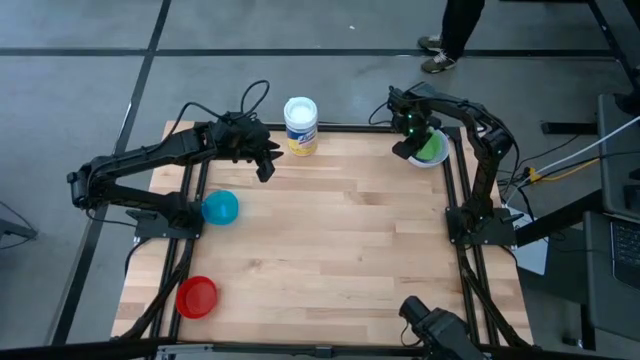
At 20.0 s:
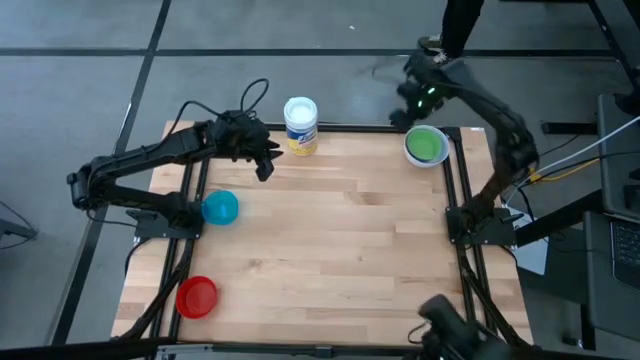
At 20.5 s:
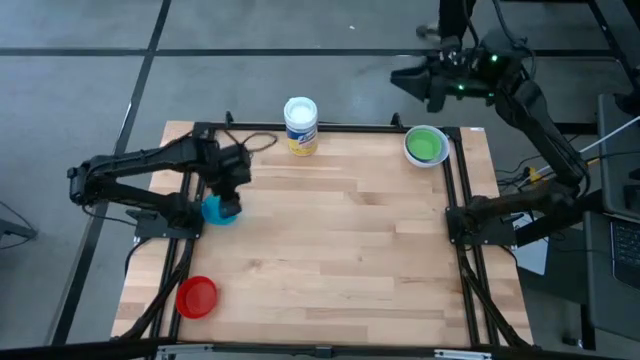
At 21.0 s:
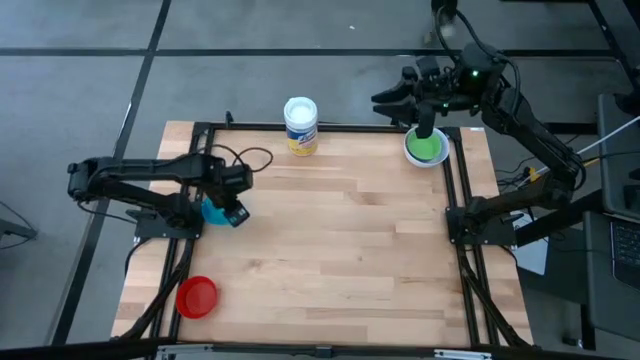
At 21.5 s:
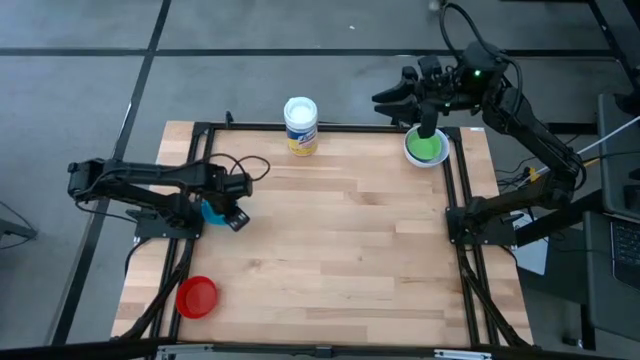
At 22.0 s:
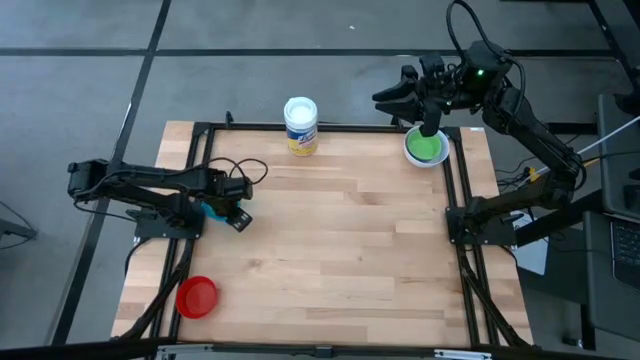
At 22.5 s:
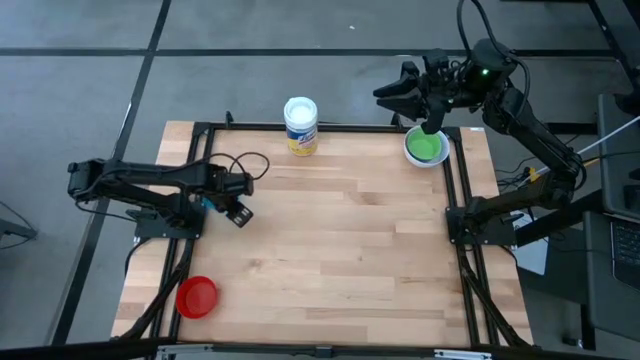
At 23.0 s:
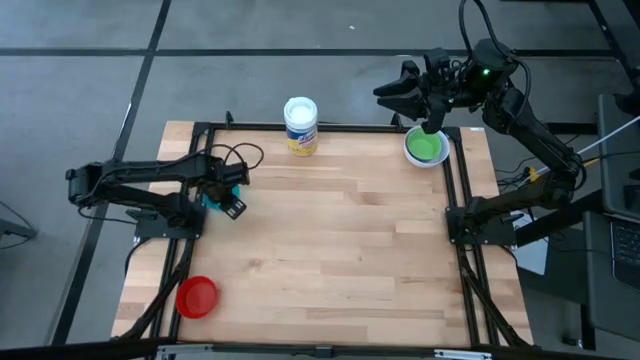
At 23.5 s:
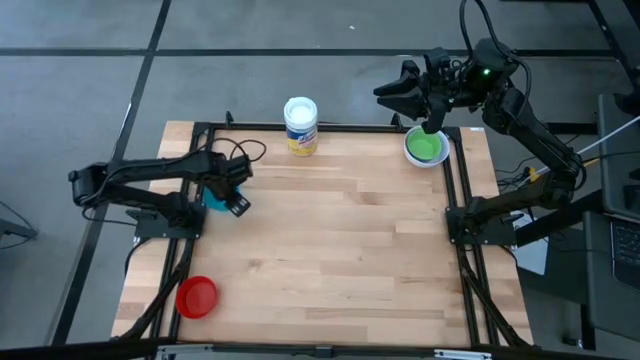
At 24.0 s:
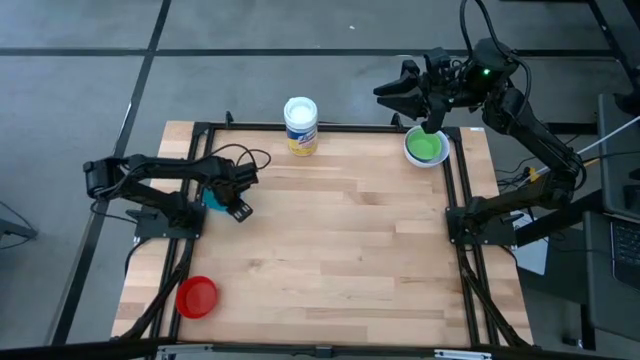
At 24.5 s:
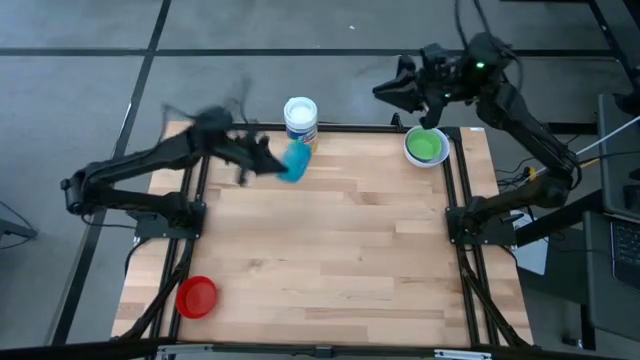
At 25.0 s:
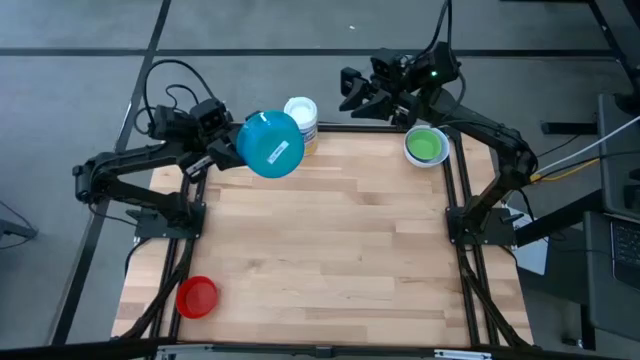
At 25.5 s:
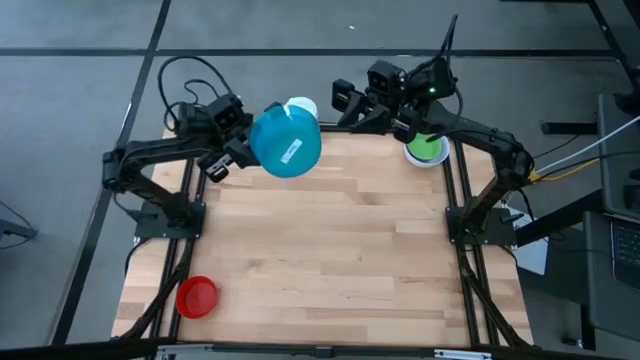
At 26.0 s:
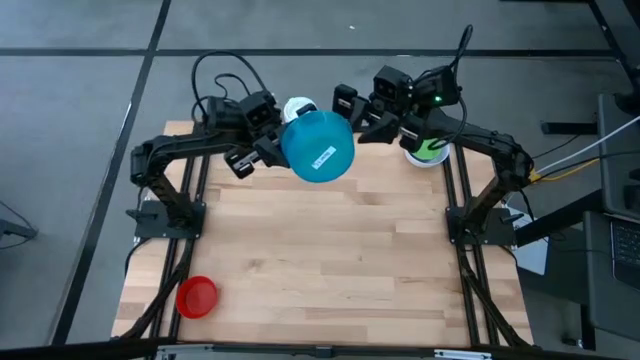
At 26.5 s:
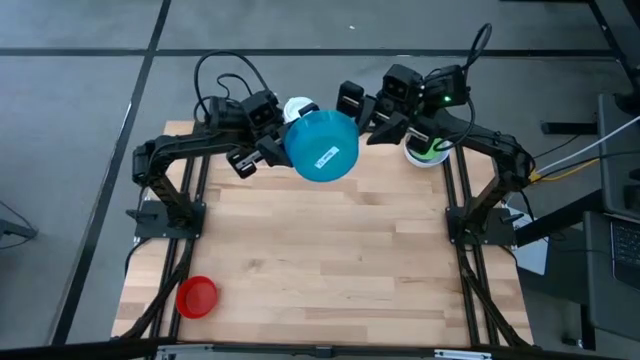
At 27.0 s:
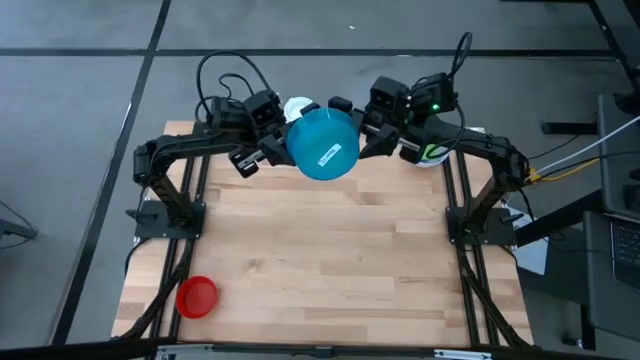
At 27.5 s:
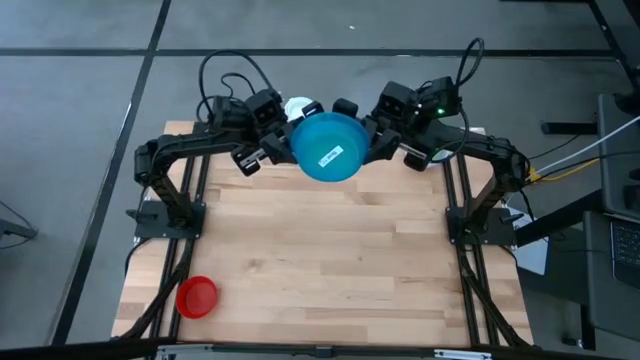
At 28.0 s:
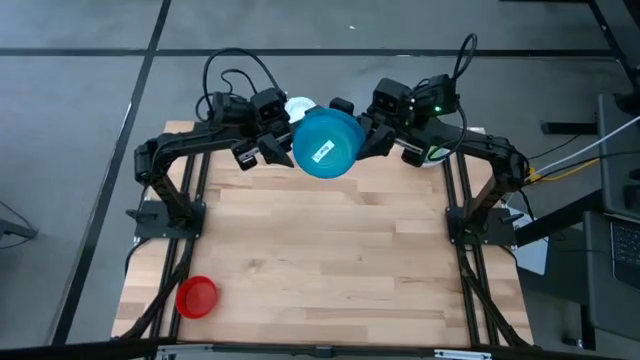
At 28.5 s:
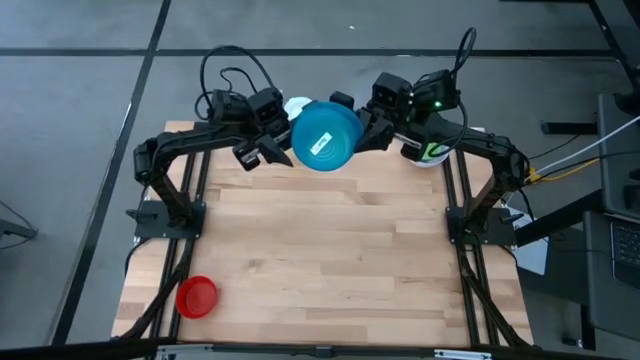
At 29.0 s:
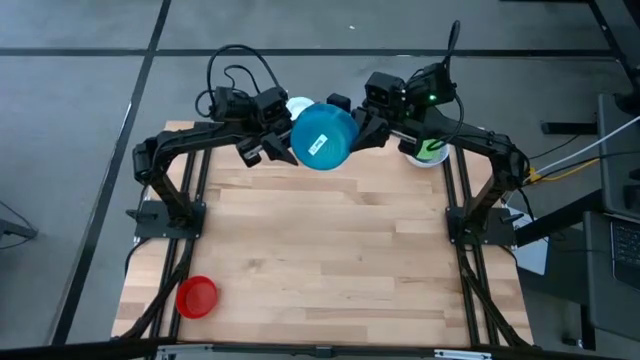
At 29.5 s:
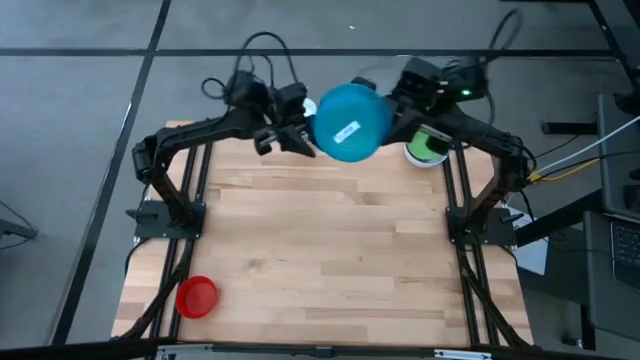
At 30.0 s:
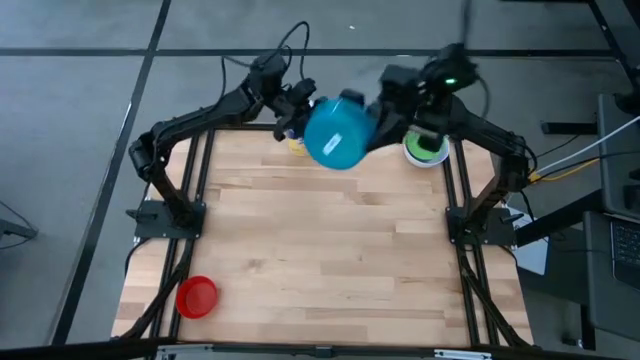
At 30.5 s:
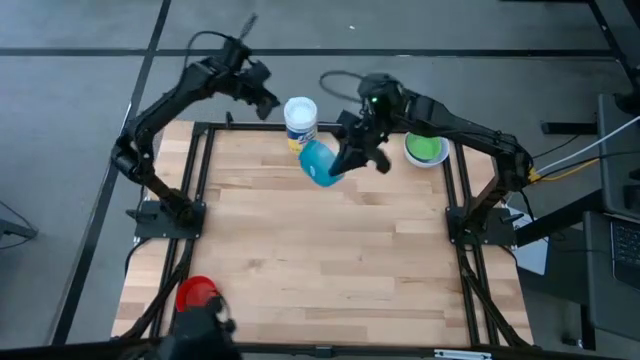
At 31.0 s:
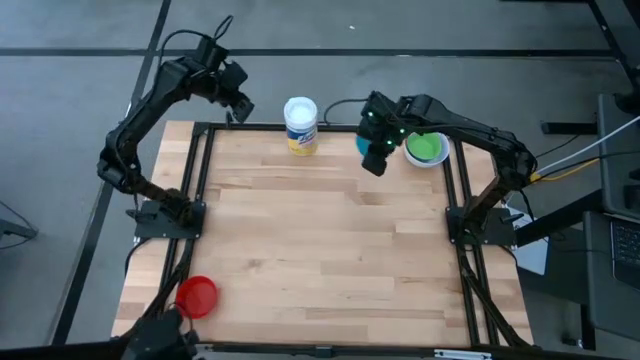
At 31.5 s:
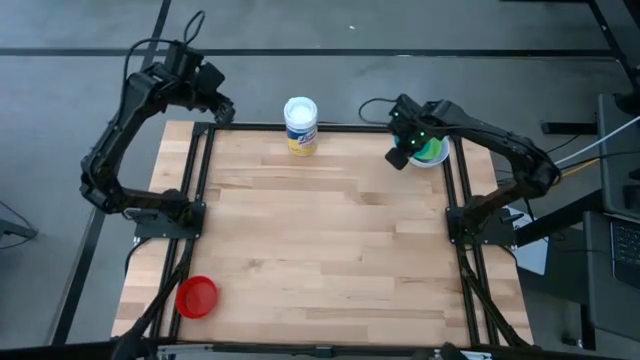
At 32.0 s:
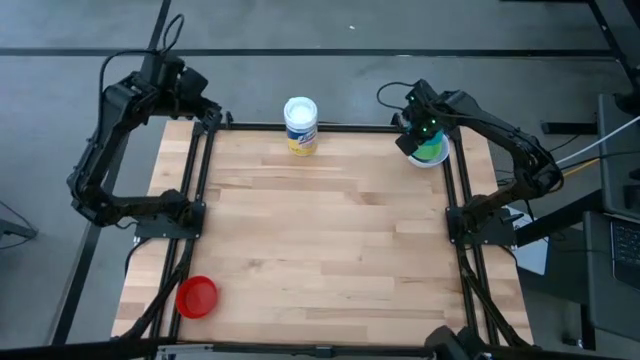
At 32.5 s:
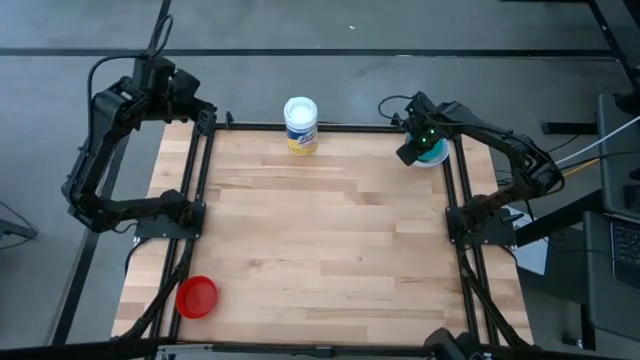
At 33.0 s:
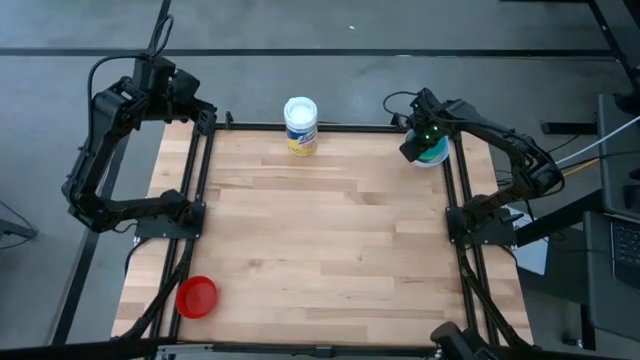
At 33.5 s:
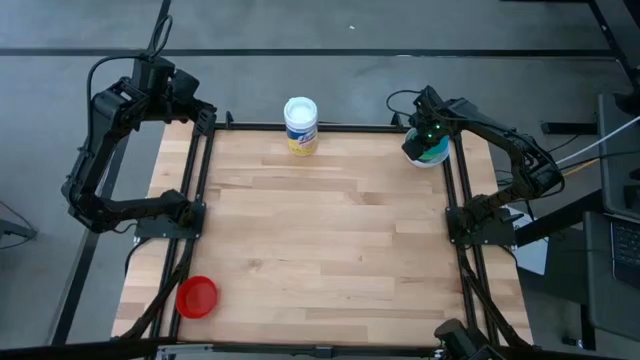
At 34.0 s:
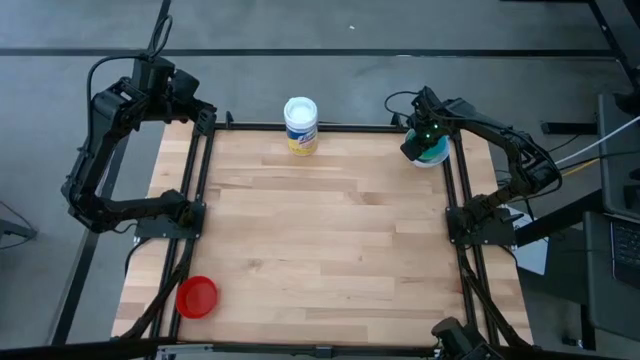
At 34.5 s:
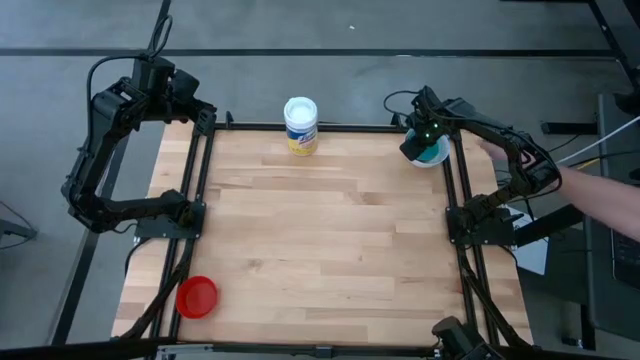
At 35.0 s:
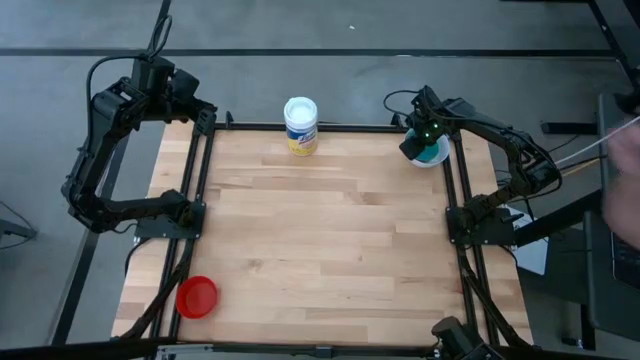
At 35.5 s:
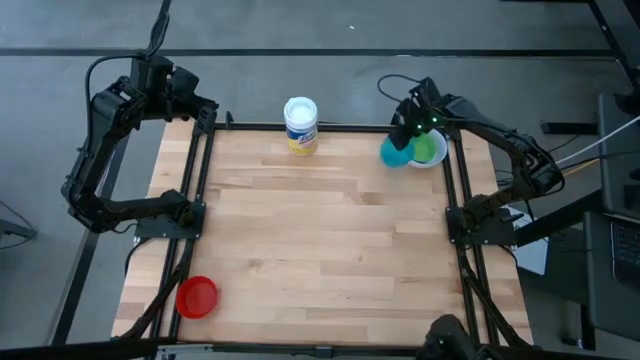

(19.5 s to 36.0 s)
Stack the light blue bowl on top of the green bowl

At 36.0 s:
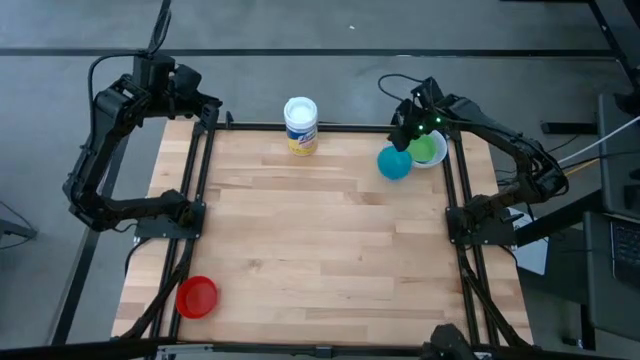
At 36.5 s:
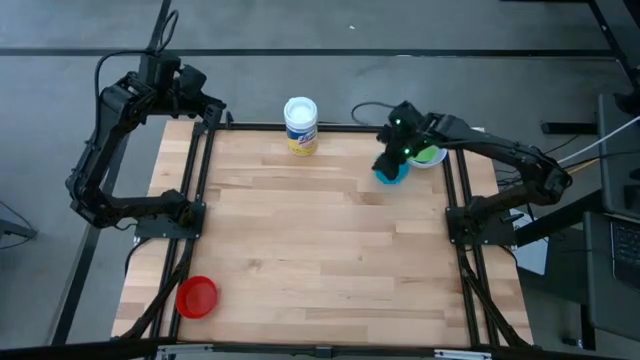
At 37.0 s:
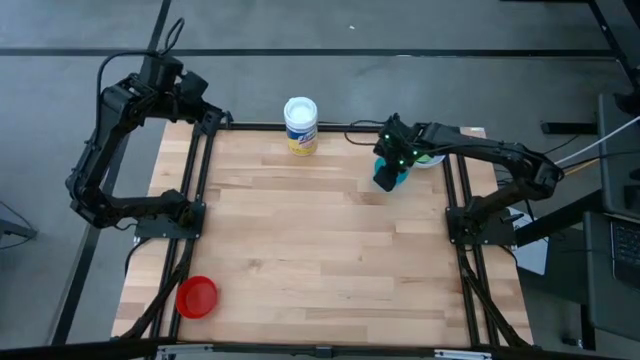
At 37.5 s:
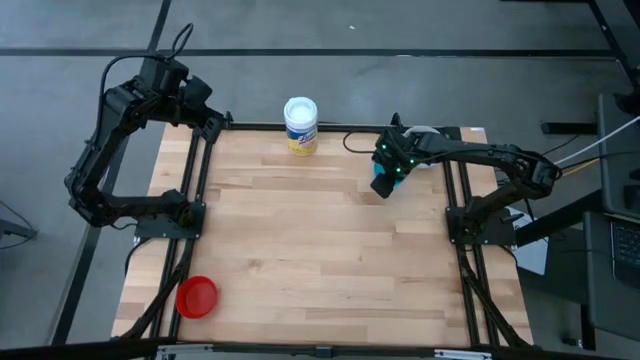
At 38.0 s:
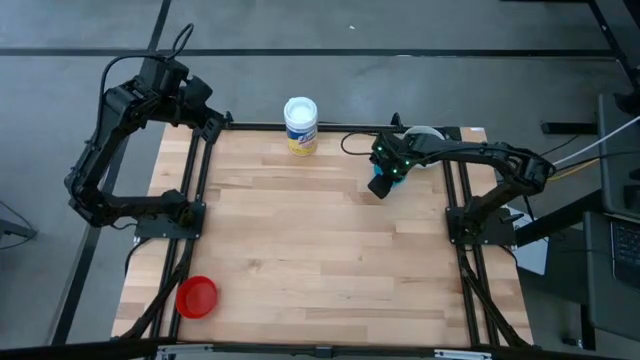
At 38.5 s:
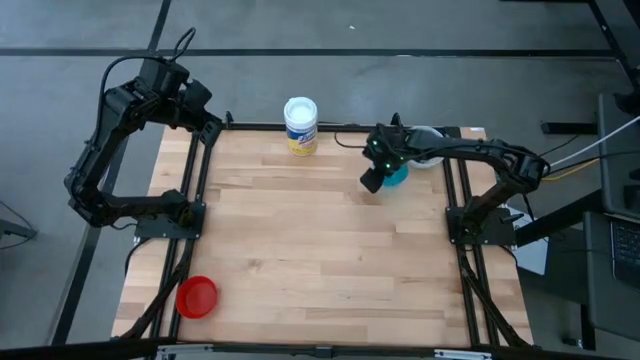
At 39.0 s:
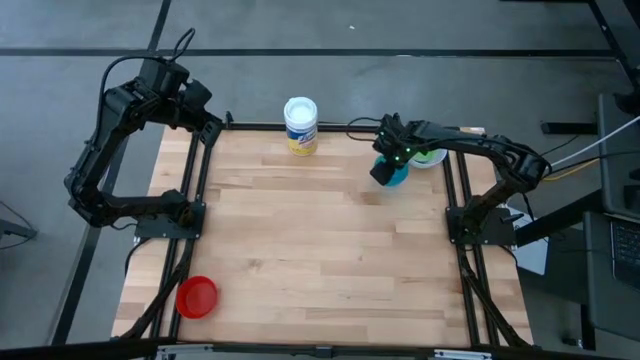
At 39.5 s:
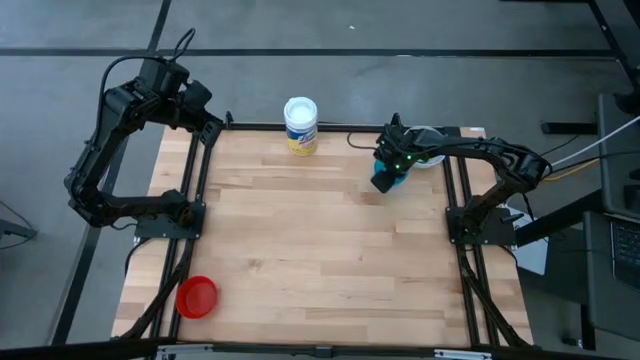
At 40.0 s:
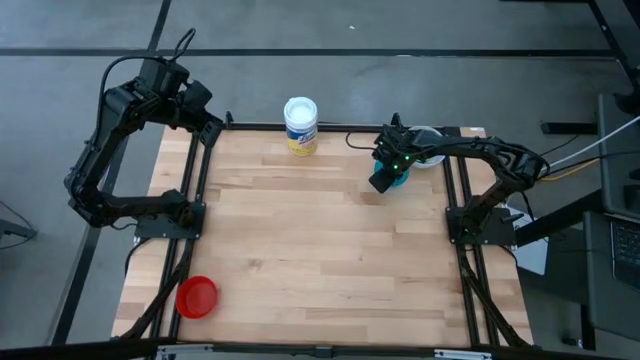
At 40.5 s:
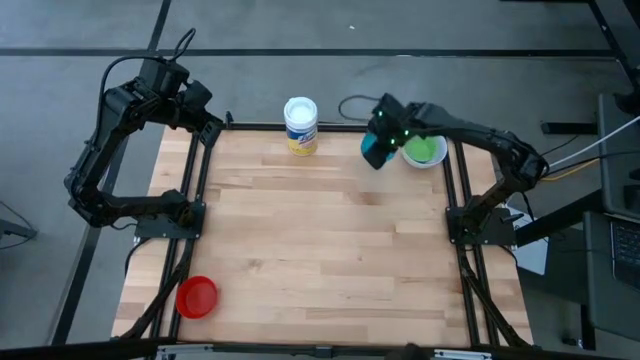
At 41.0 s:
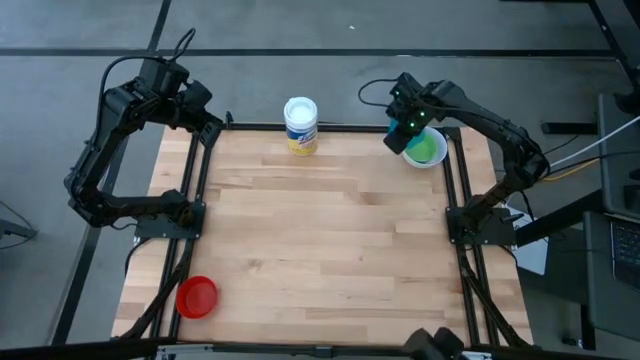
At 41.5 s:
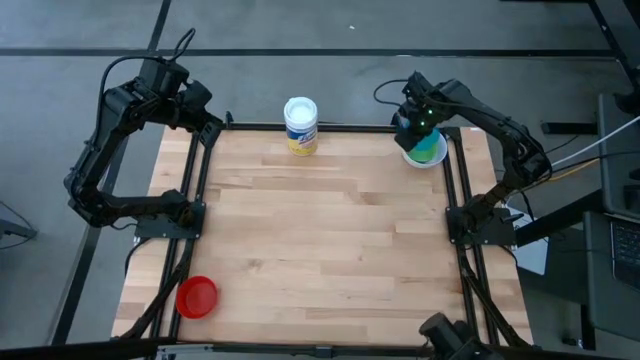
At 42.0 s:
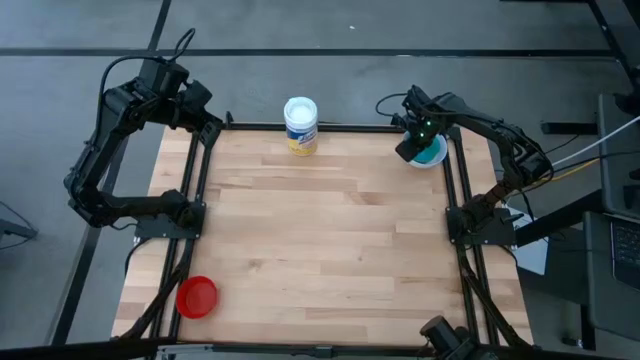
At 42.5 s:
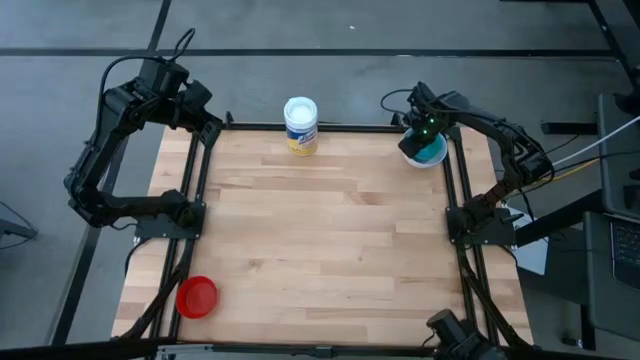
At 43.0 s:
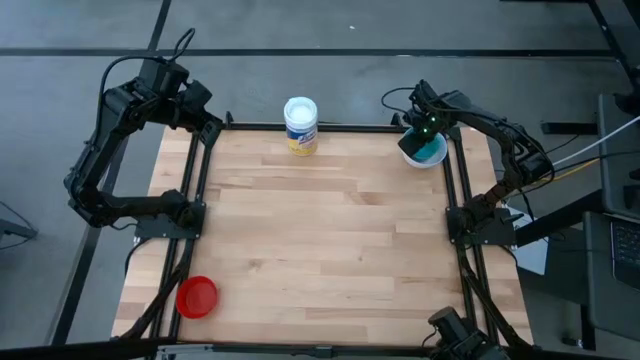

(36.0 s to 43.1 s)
Stack the light blue bowl on top of the green bowl
